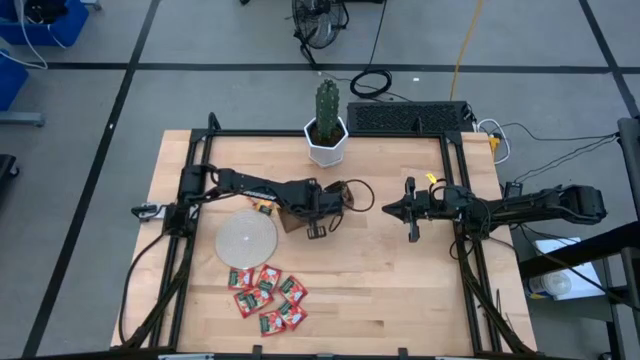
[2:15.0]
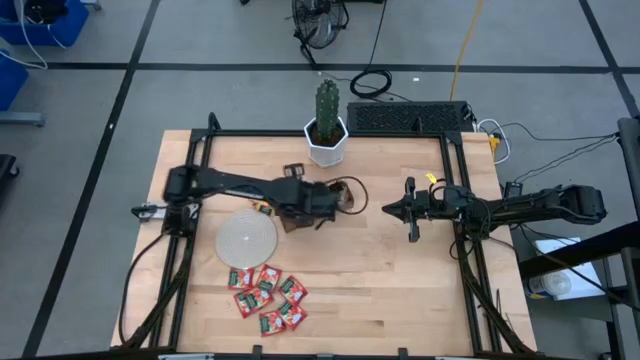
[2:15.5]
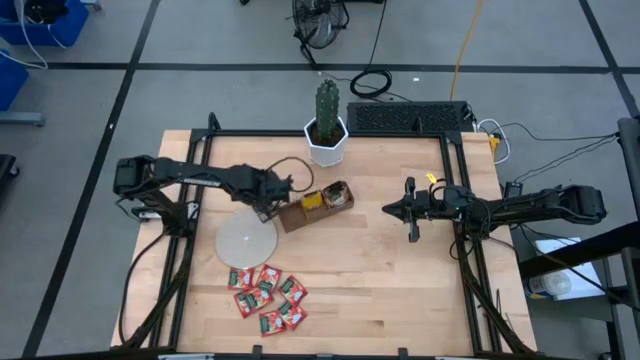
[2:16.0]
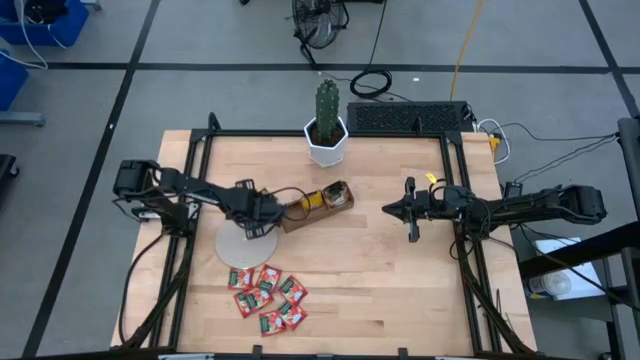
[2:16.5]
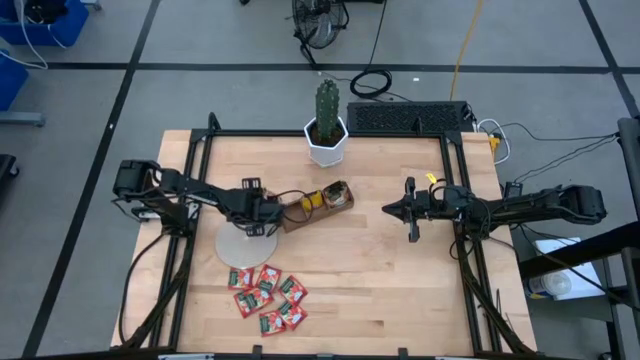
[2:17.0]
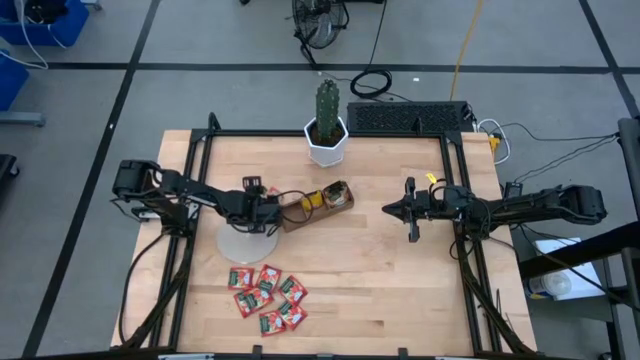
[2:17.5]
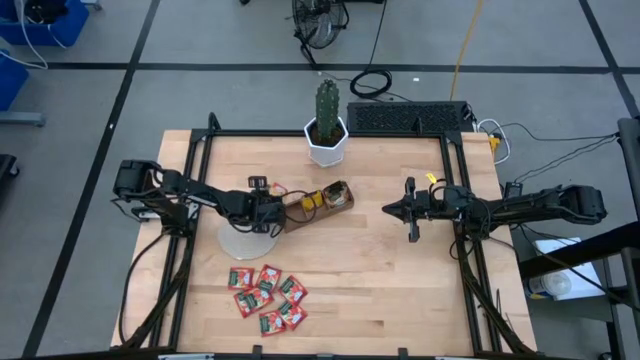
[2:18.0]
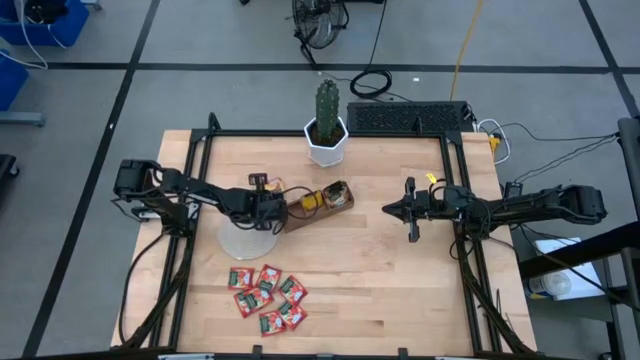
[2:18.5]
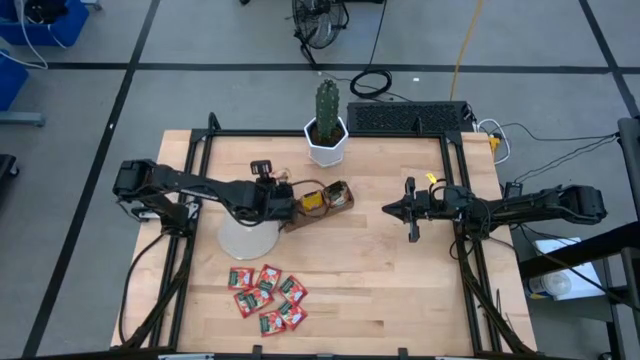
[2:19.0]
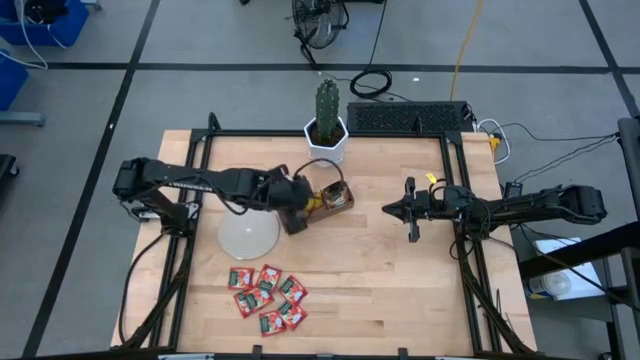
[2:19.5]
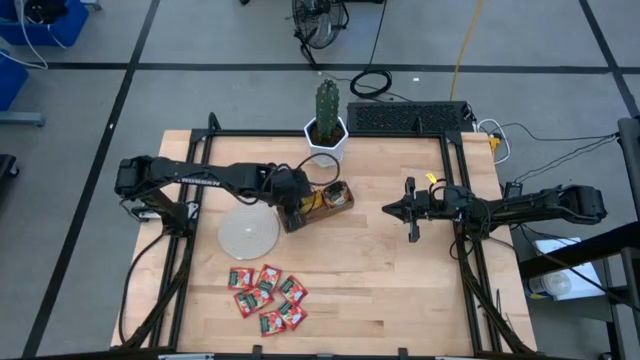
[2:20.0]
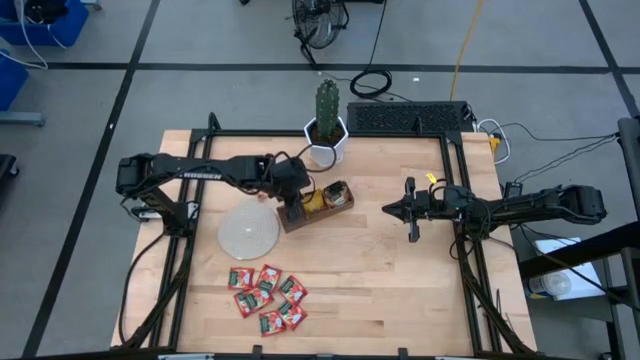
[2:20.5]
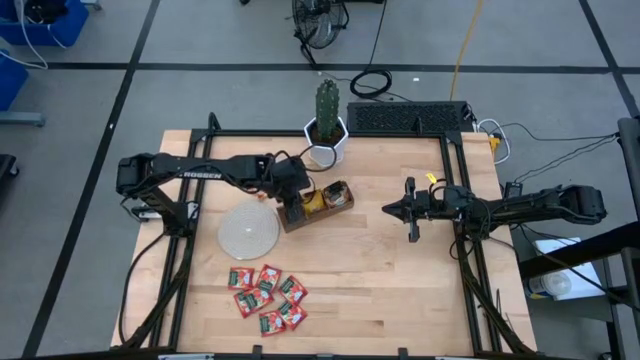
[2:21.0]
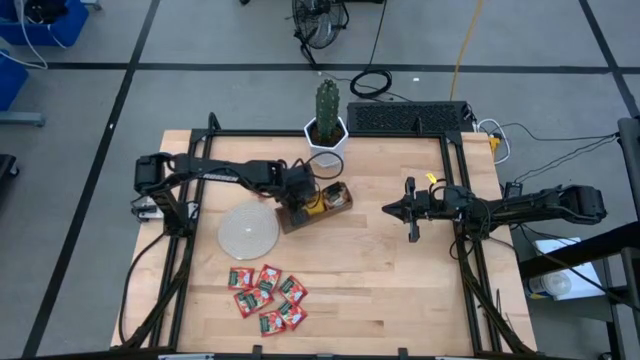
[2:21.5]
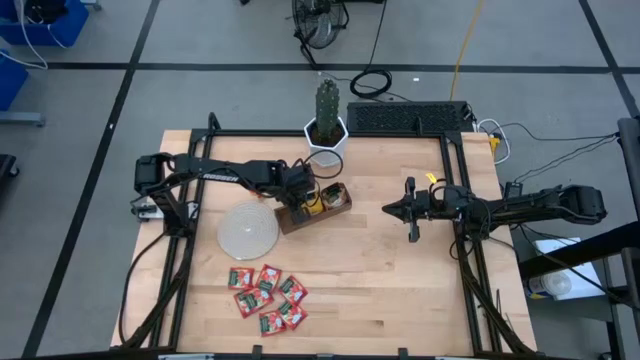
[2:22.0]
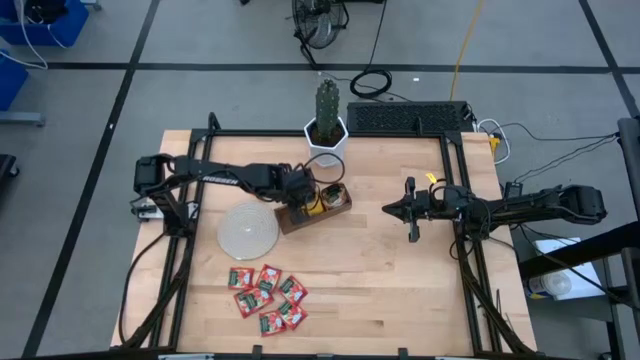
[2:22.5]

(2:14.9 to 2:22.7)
Task: Pick & Place Tea
Put the yellow tea bag into the middle section of the wooden organizer

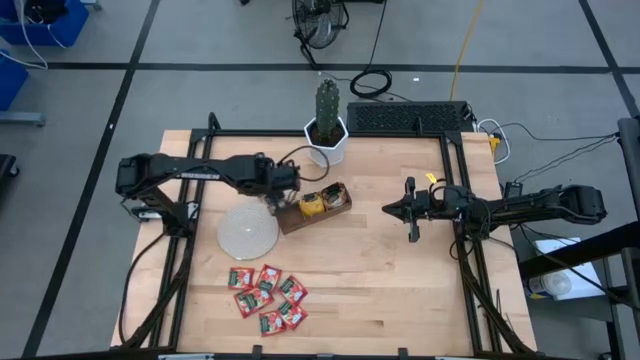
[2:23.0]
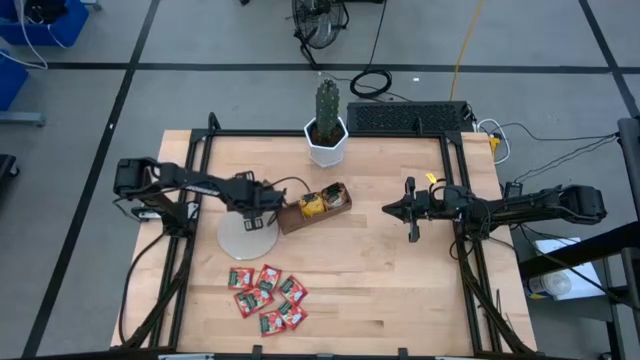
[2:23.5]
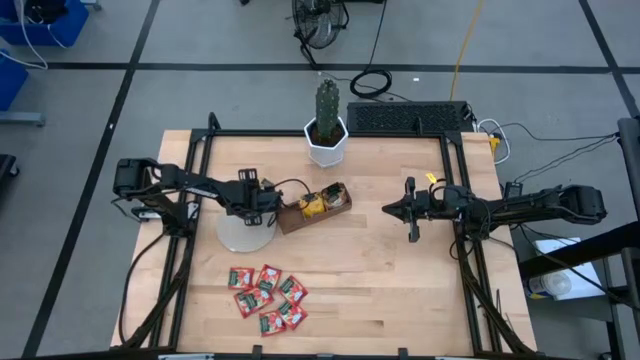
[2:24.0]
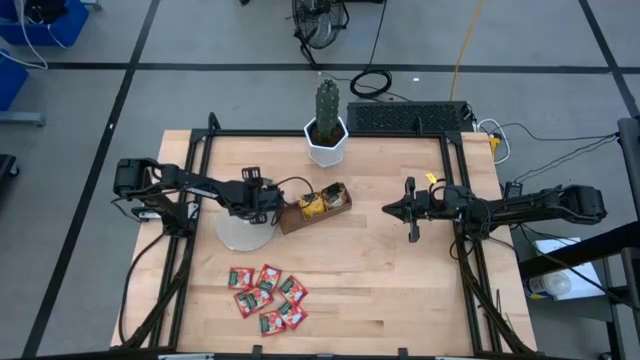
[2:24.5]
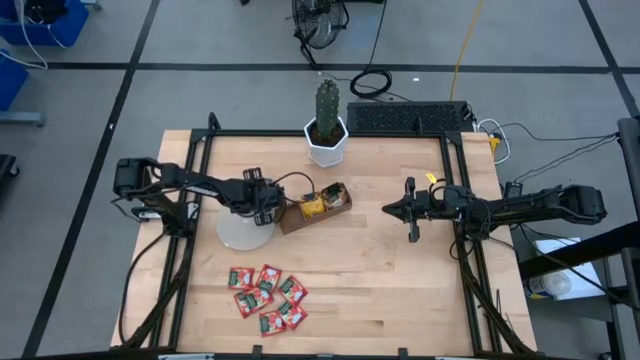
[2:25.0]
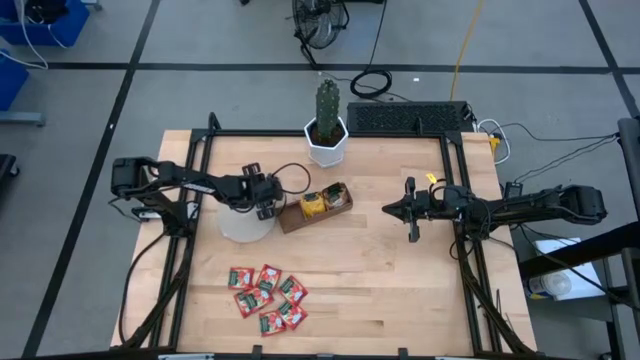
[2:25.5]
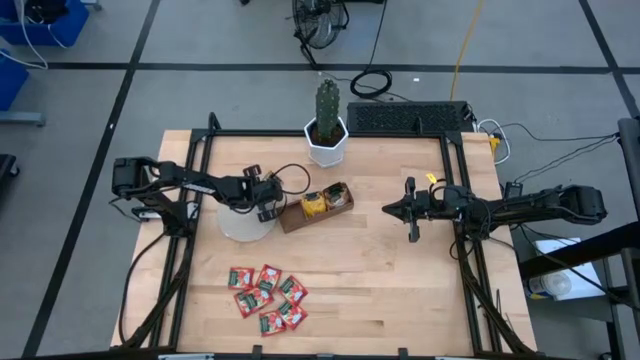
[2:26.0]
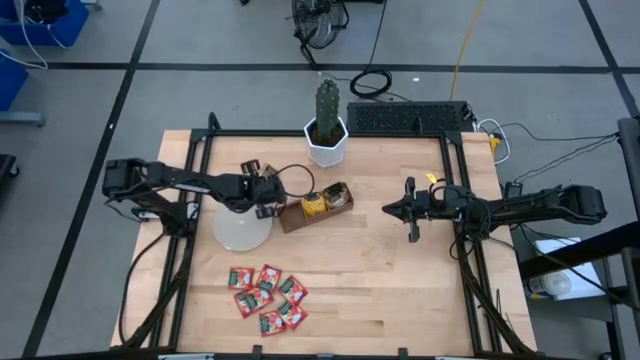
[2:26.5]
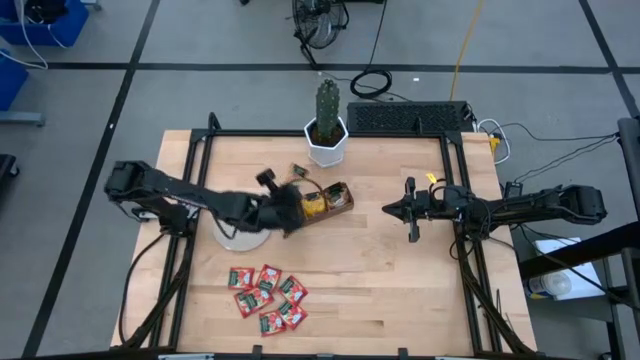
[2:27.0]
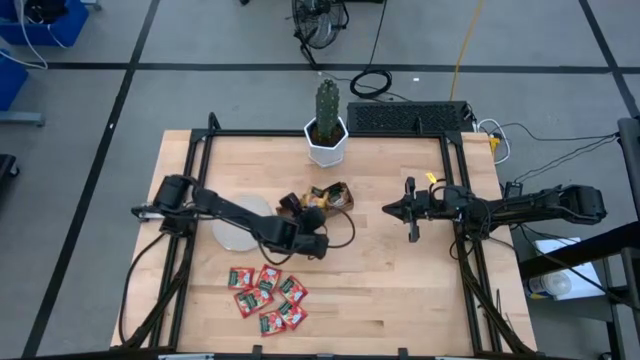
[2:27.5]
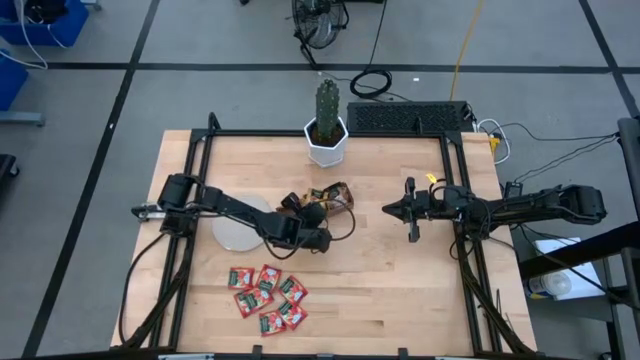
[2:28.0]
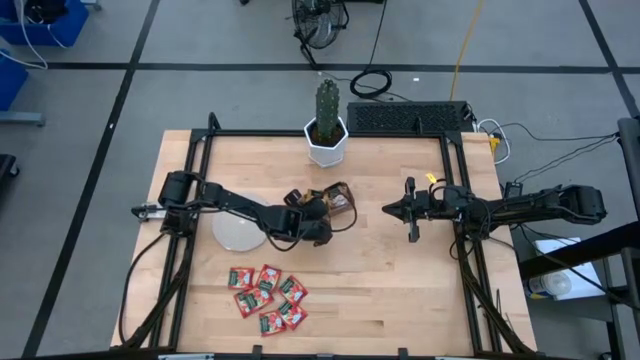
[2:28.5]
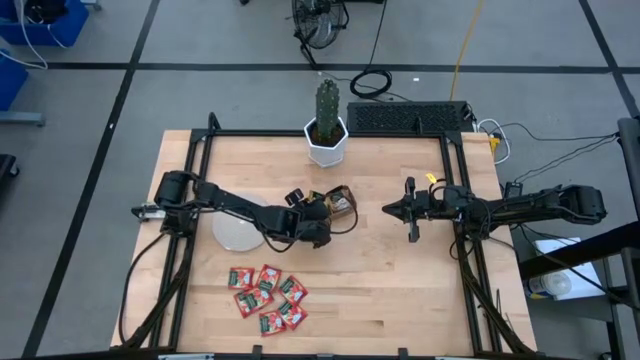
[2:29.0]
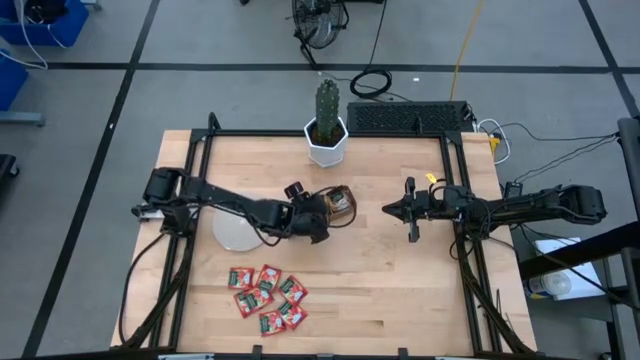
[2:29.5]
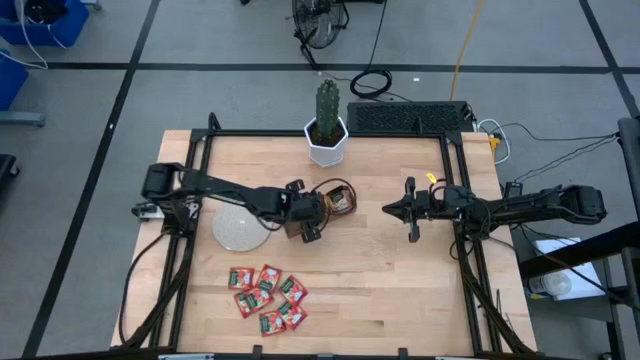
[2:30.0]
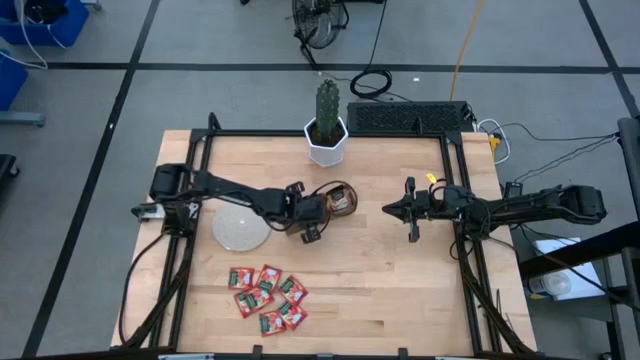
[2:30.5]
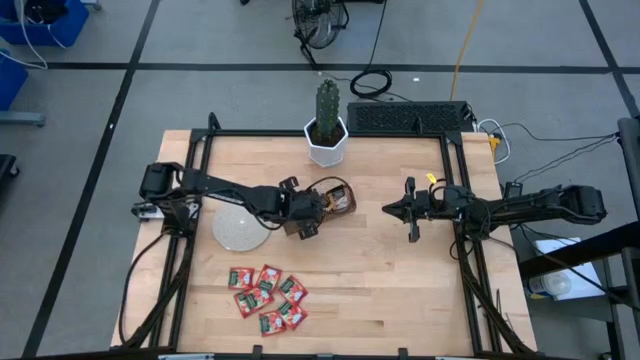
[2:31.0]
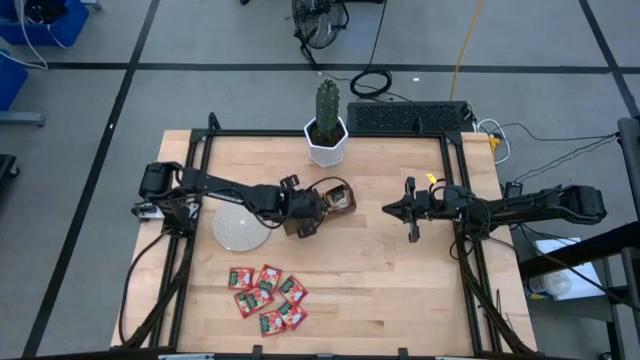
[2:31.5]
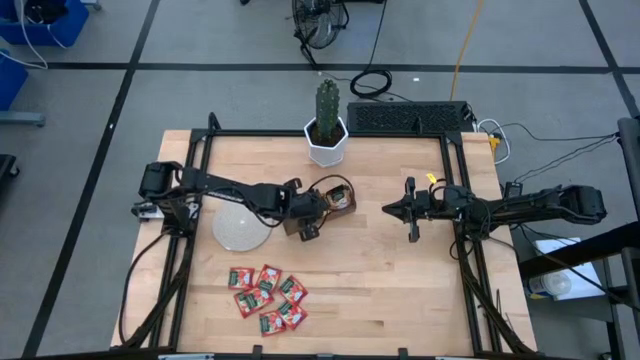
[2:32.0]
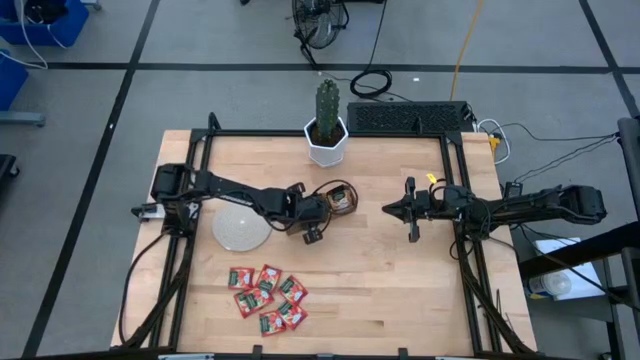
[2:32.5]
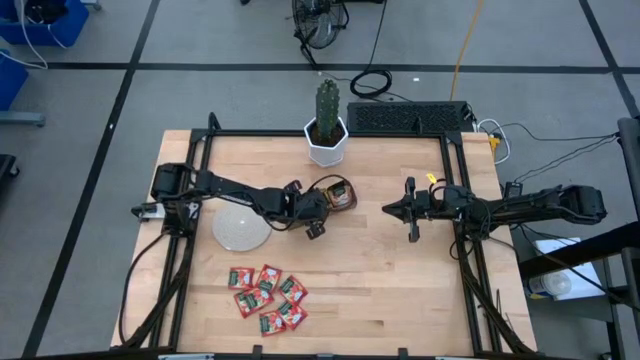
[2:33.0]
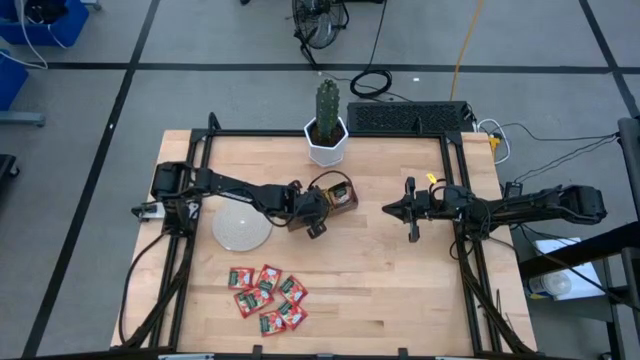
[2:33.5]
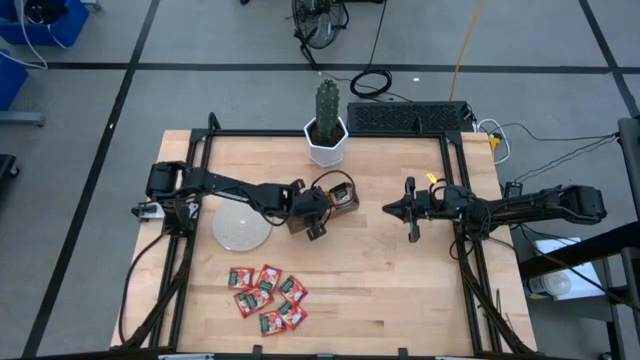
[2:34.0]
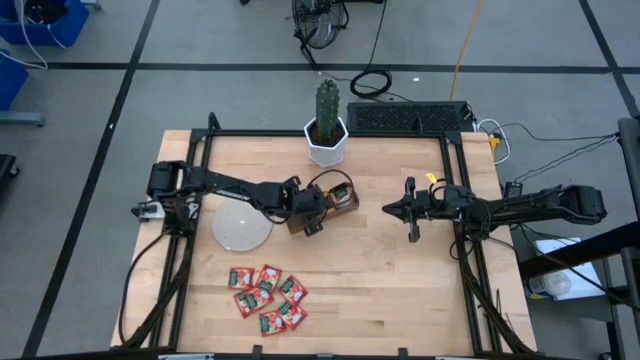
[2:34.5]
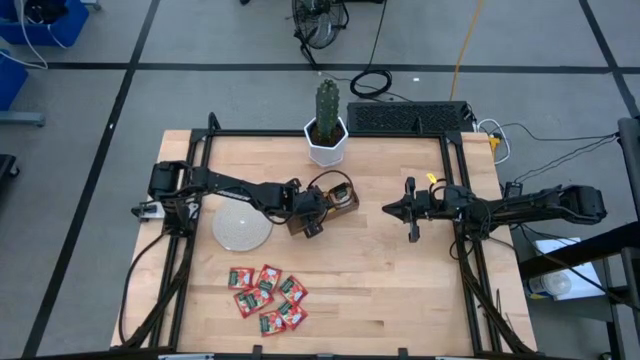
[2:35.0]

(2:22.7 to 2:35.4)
Put the yellow tea bag into the middle section of the wooden organizer

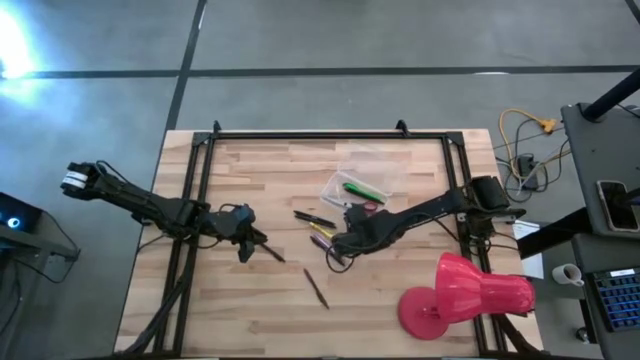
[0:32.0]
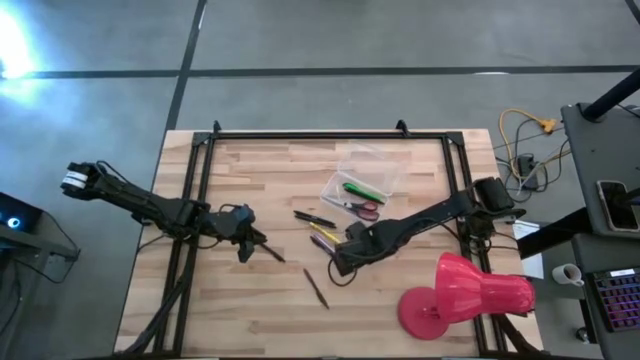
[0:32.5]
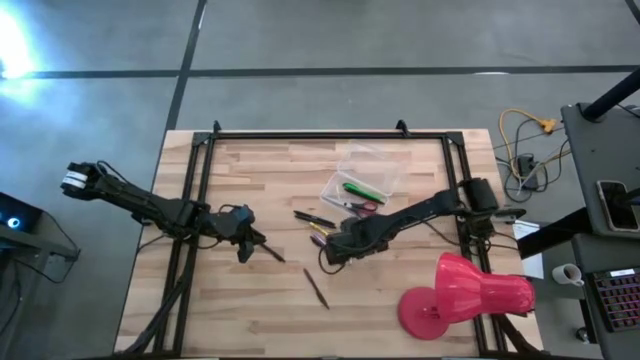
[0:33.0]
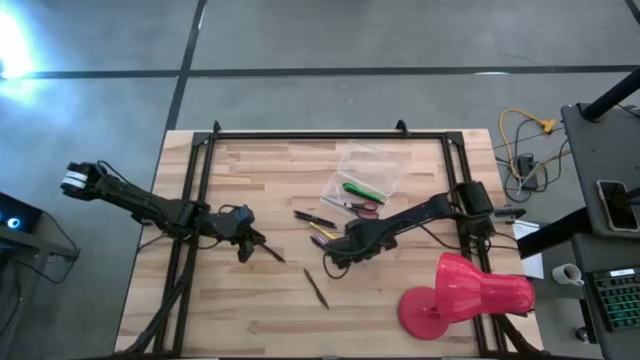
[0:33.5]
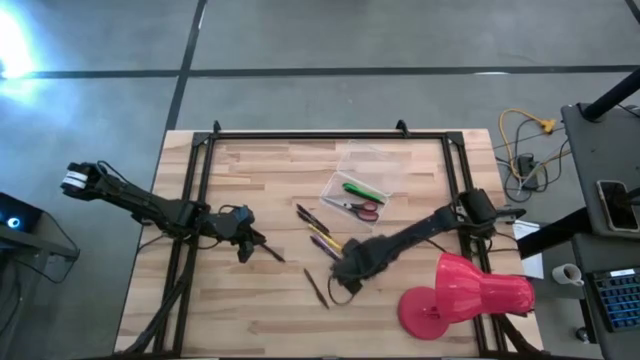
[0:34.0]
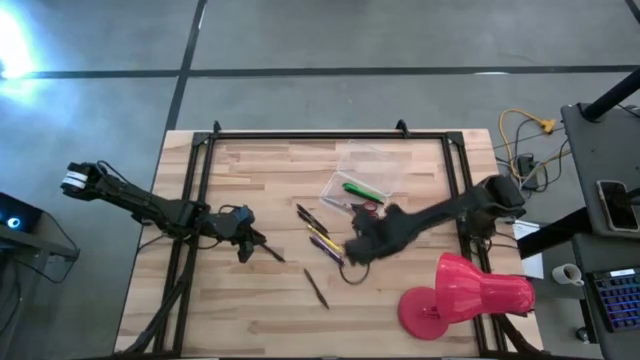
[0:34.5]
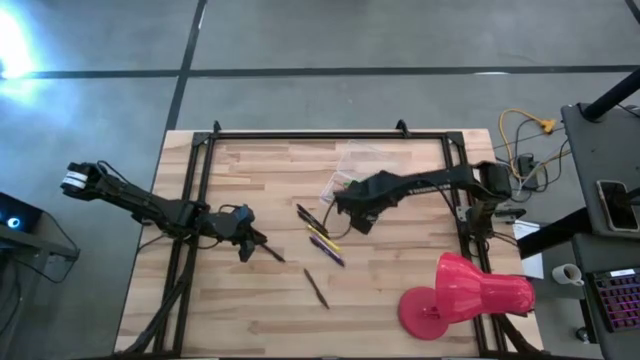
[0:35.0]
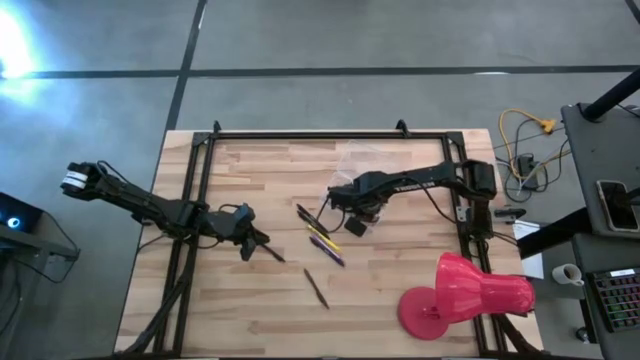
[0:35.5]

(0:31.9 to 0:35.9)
Task: Pick & place school supplies into a supply box
Put the orange pencil into the transparent supply box
